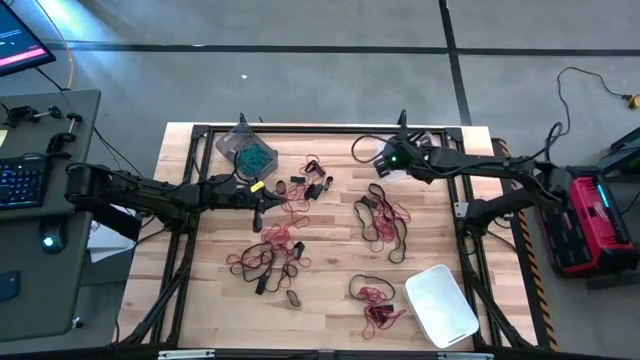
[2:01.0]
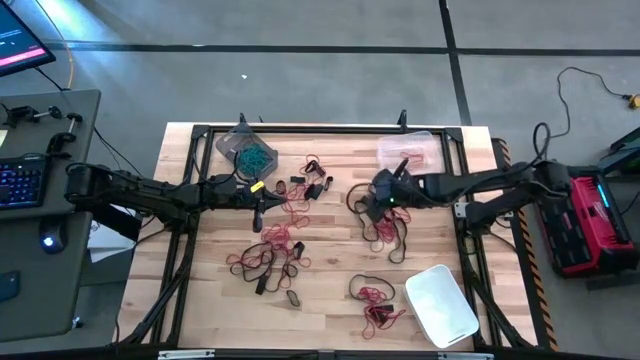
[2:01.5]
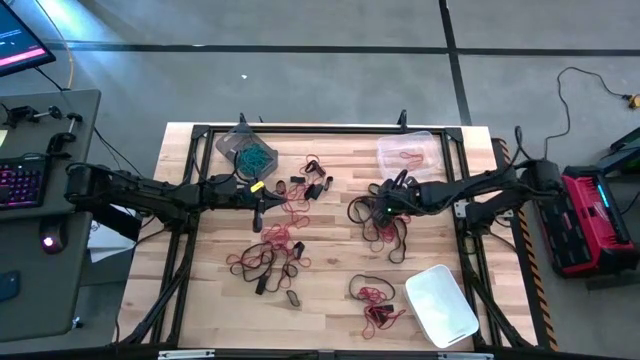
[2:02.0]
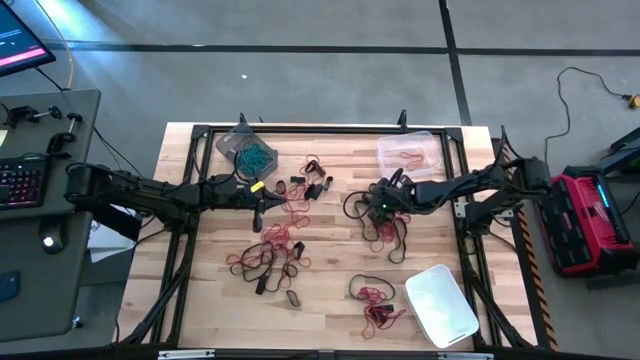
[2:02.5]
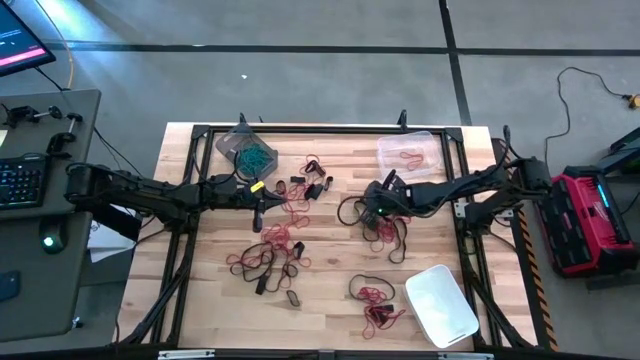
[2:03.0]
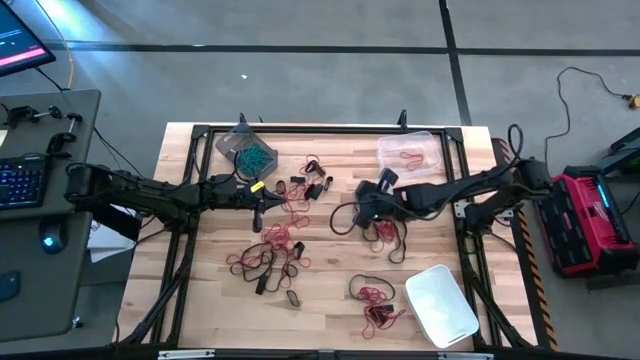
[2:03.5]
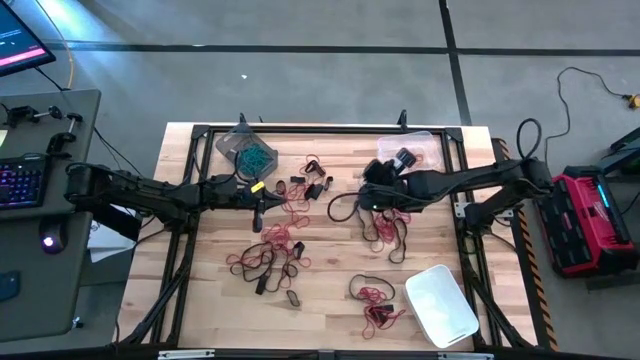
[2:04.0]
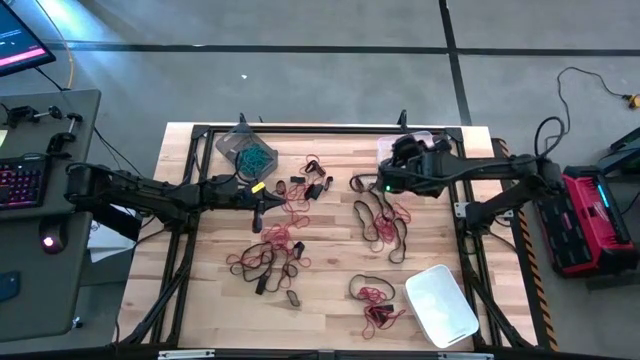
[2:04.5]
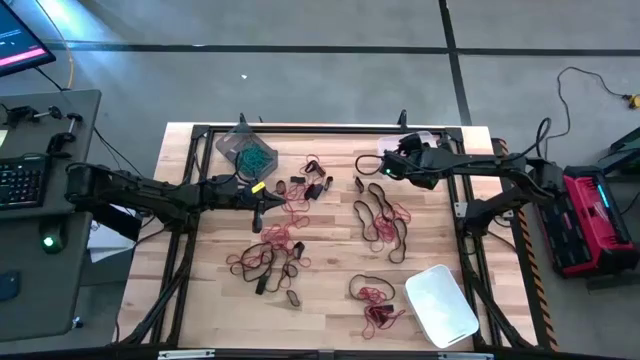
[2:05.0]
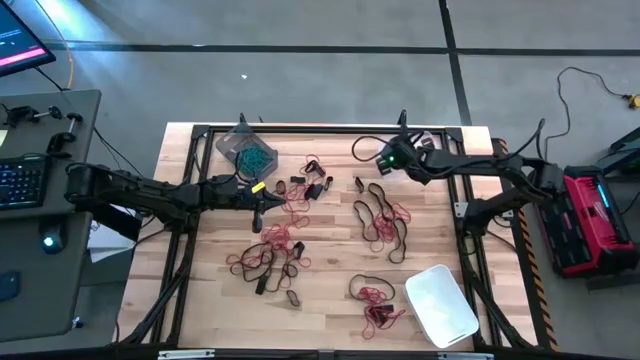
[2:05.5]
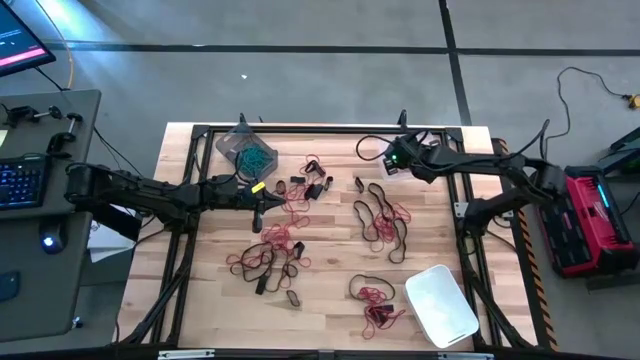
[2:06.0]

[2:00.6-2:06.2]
Task: Sort rubber bands into baskets
Put the red rubber band into the transparent bin

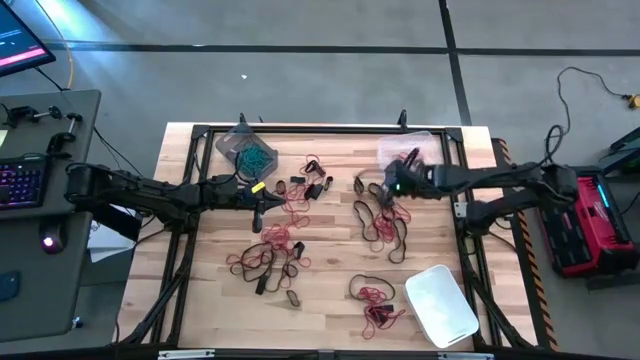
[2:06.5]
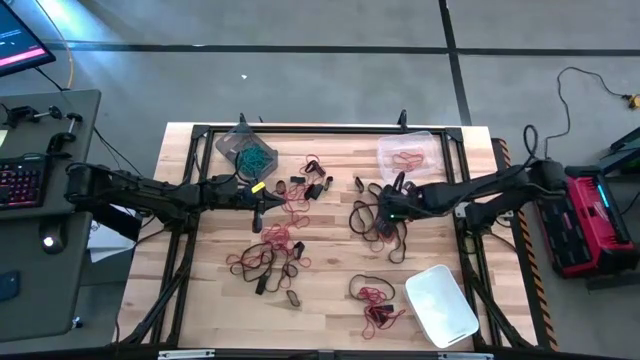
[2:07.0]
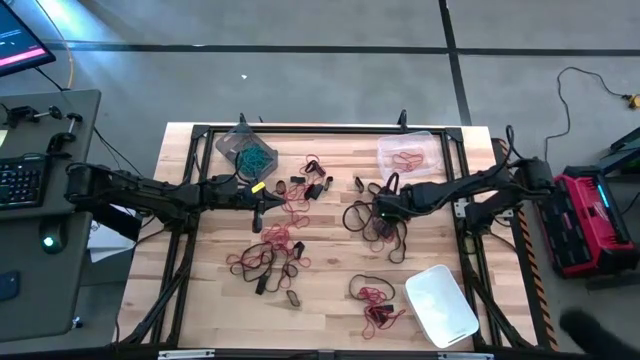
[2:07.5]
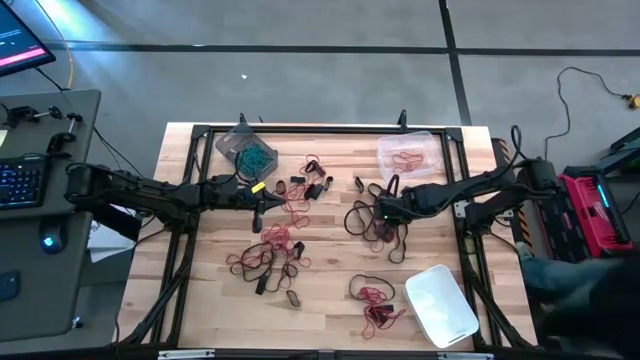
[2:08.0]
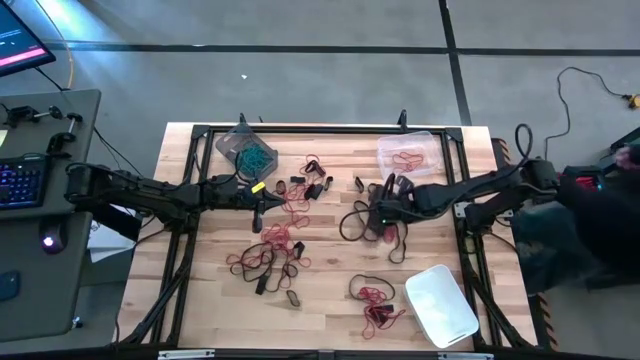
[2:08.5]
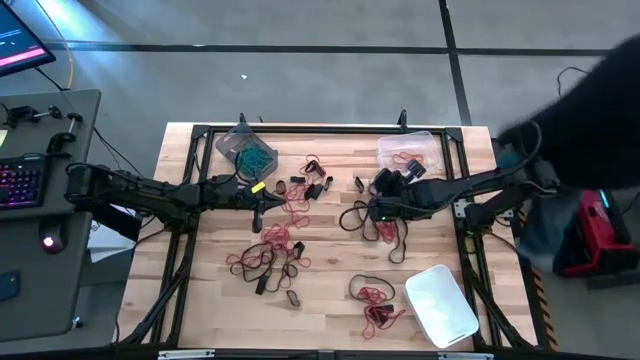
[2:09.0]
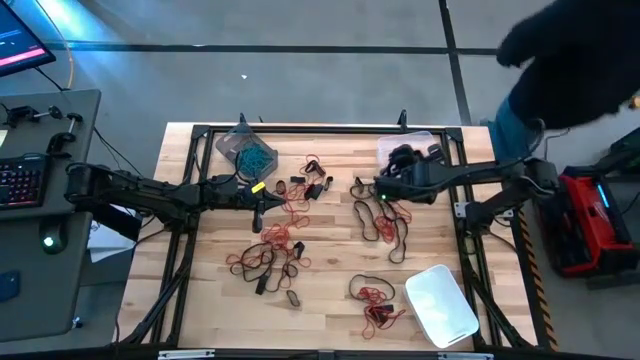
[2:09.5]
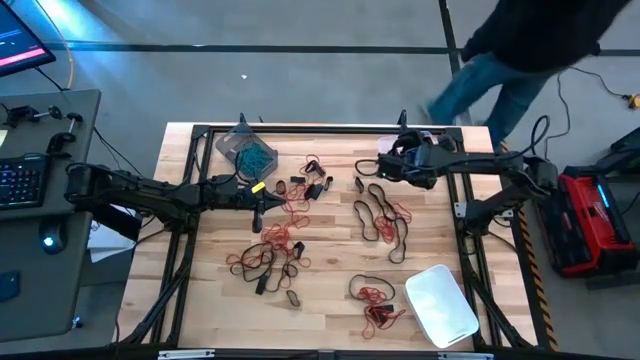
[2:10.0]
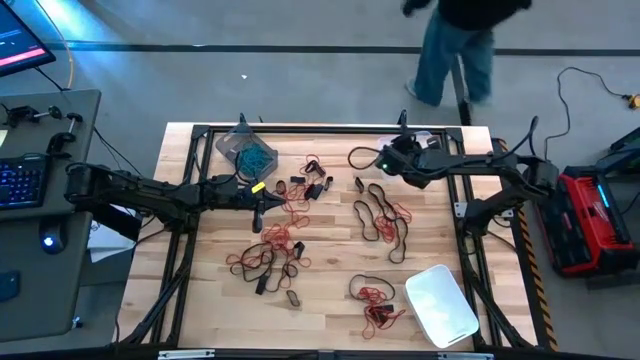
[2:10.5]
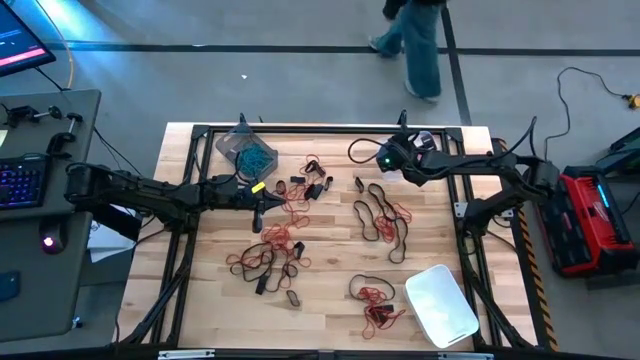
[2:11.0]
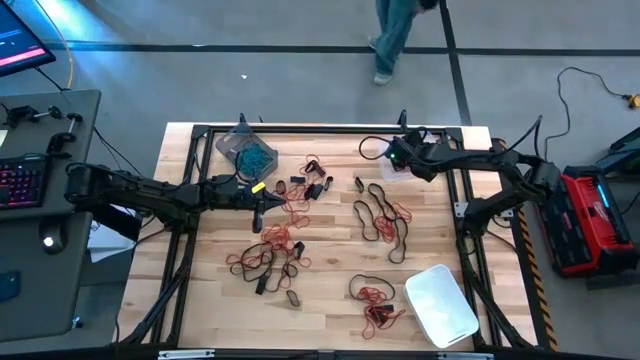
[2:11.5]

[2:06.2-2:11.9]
Put the red rubber band into the transparent bin

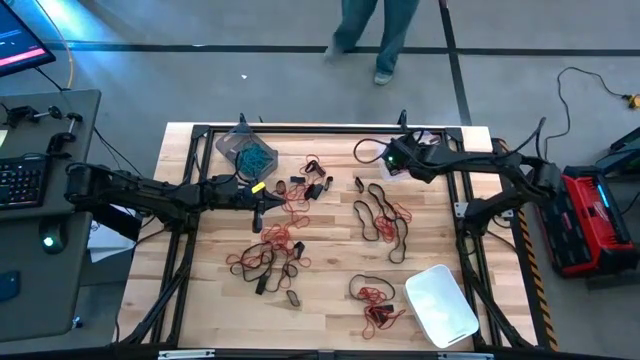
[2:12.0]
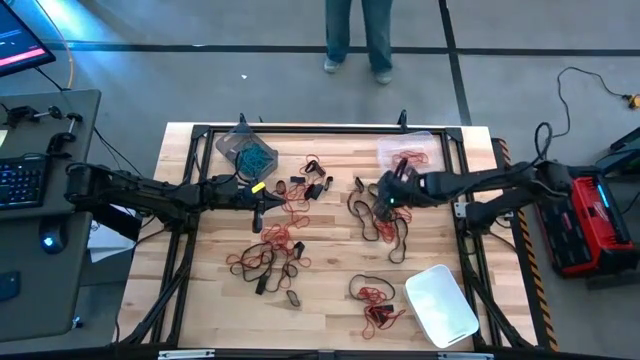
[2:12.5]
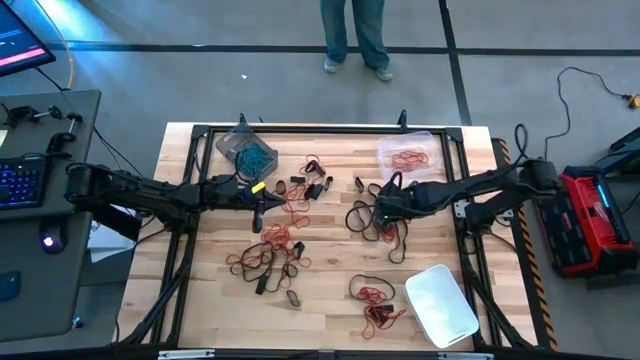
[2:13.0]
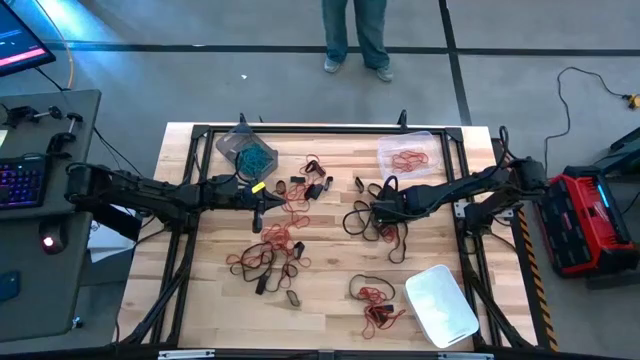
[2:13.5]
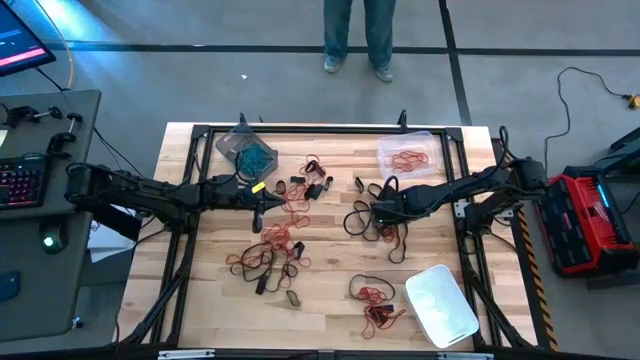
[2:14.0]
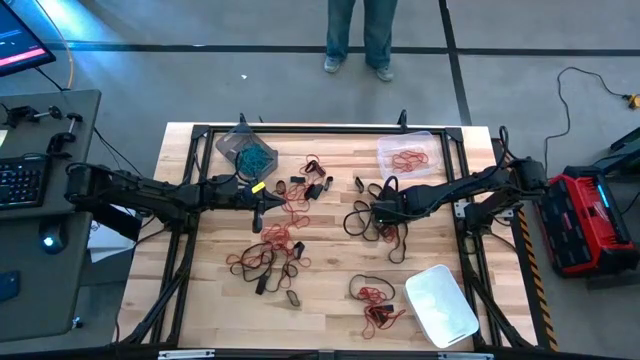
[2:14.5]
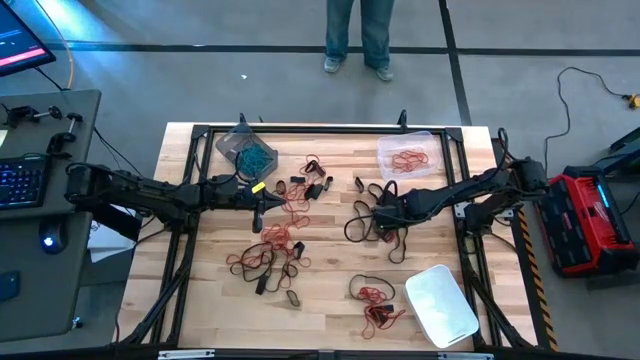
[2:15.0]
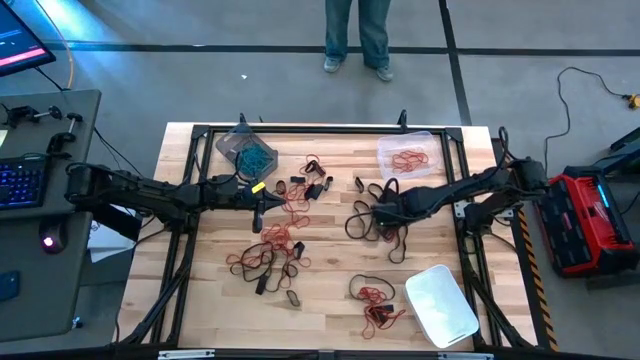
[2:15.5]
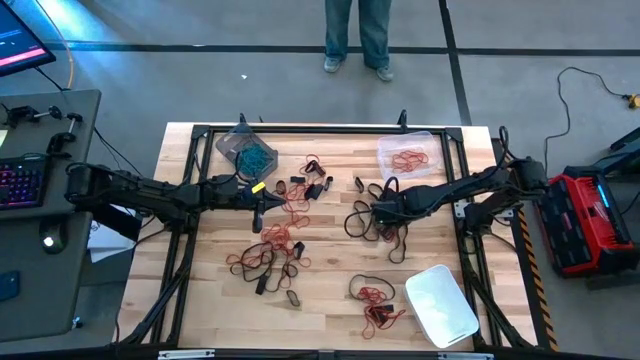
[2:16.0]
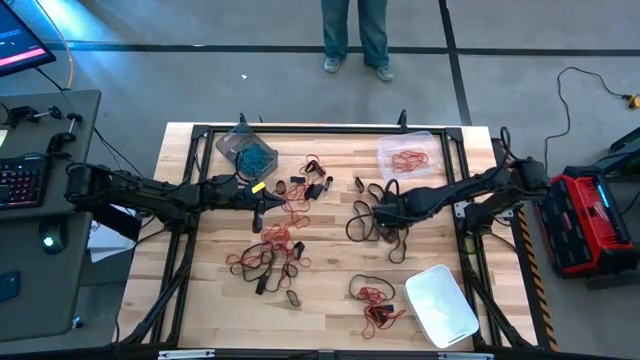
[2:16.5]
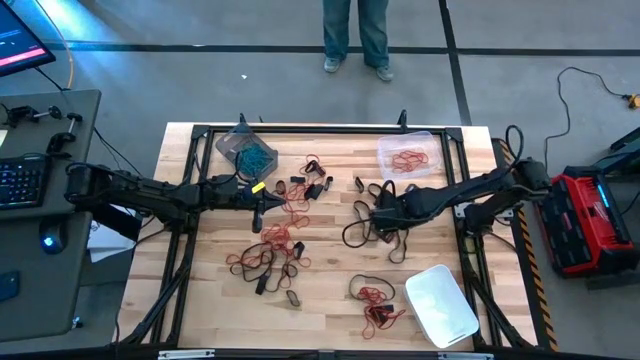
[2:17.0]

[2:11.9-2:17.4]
Put the red rubber band into the transparent bin

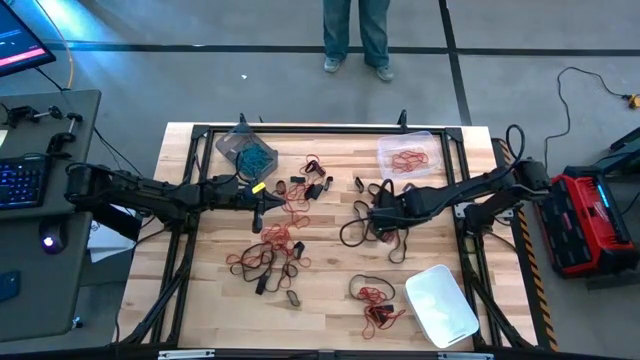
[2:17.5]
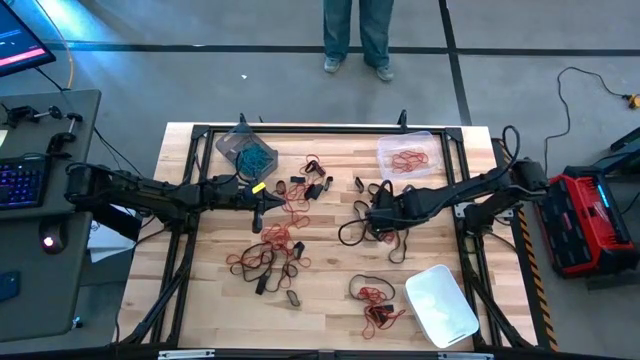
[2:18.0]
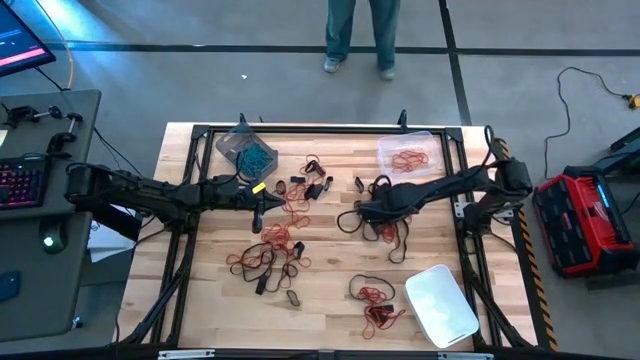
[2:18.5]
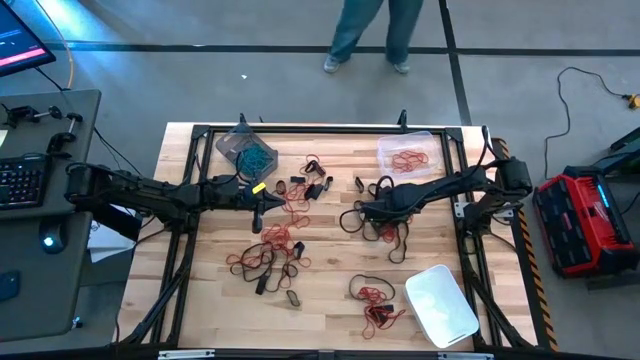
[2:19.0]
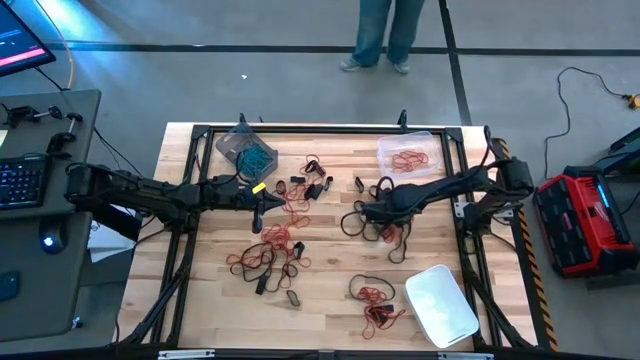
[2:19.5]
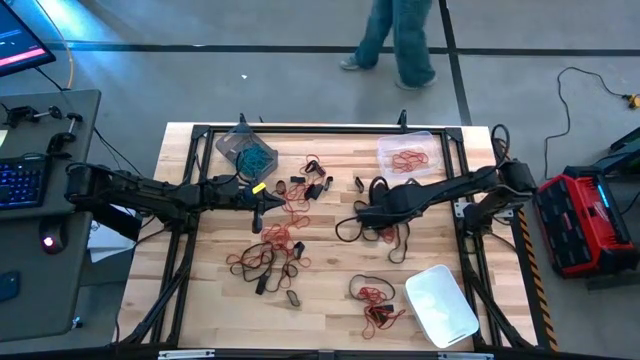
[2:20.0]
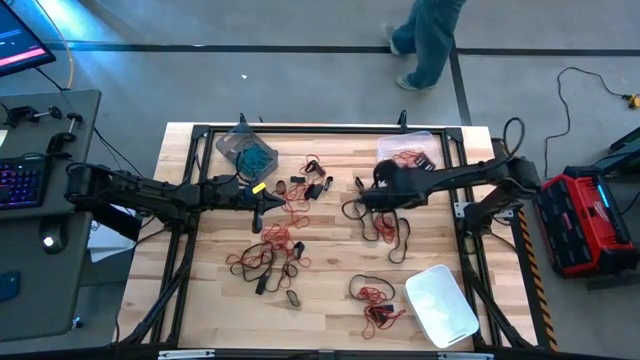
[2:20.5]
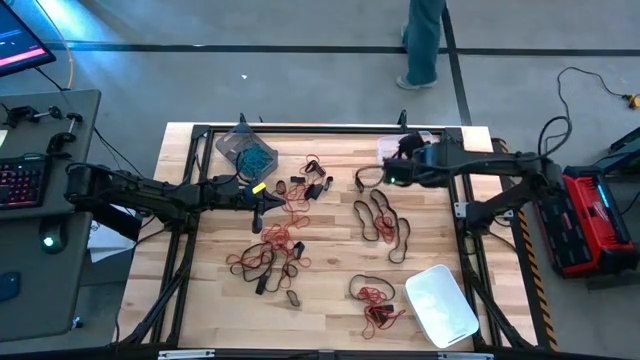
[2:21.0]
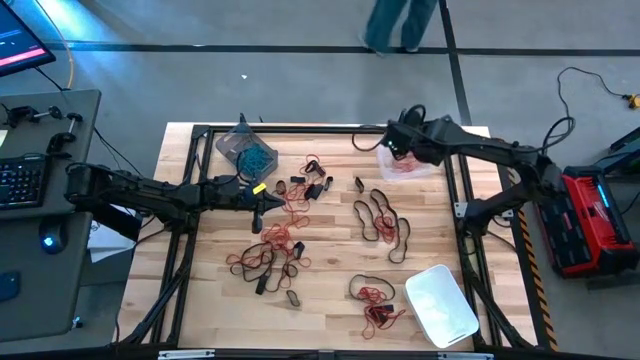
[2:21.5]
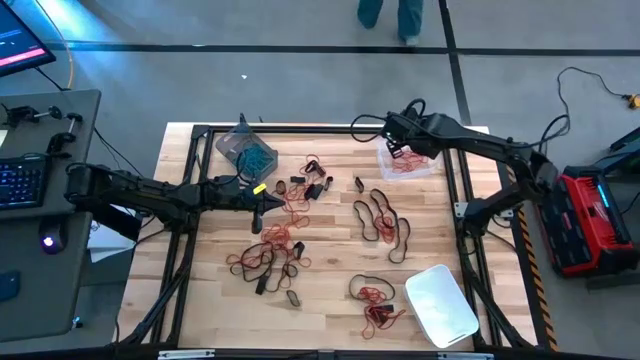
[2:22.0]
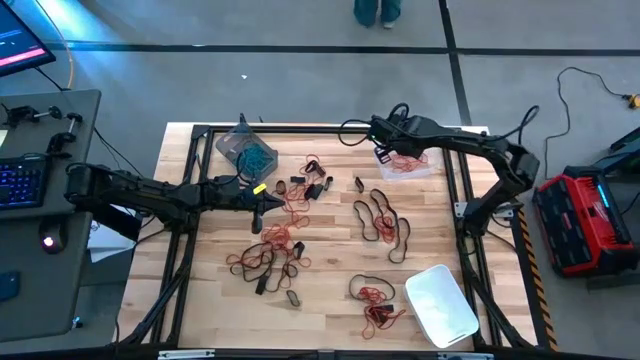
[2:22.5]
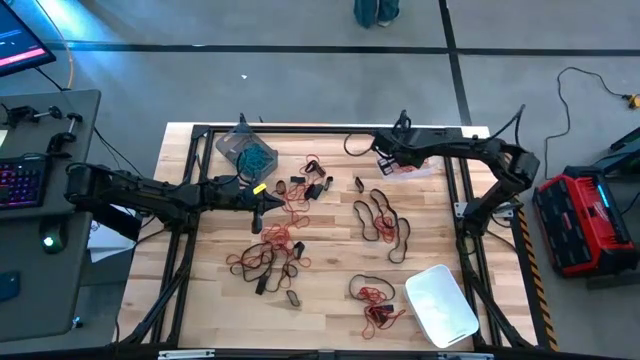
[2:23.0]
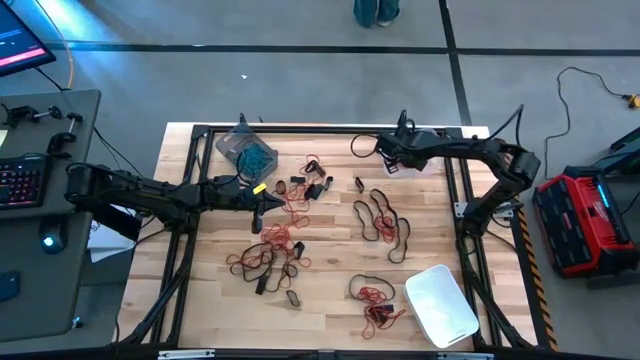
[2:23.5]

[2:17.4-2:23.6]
Put the red rubber band into the transparent bin
